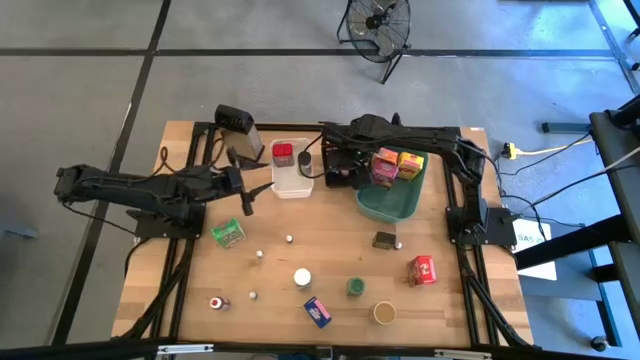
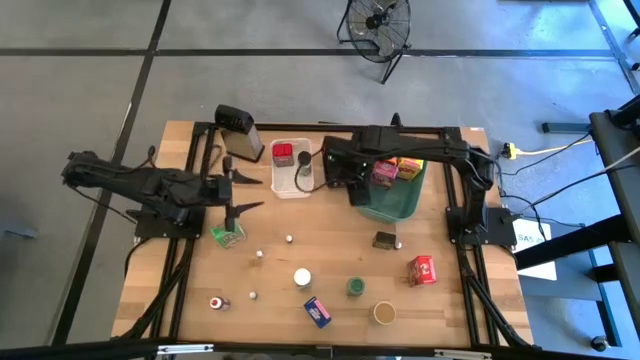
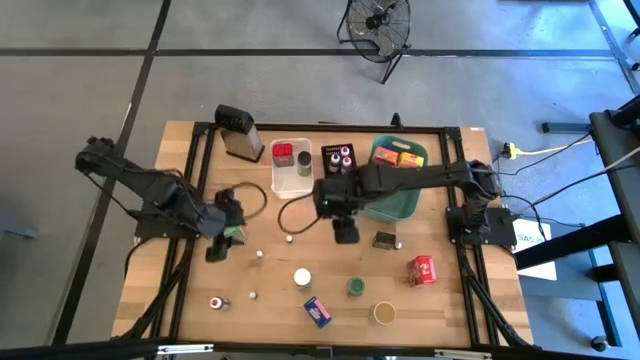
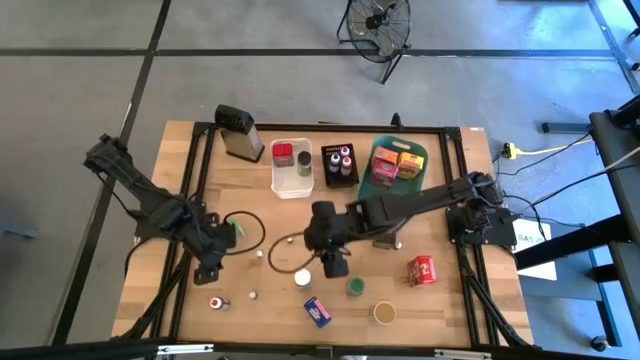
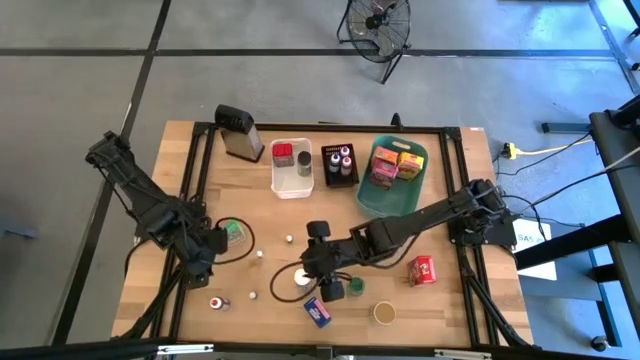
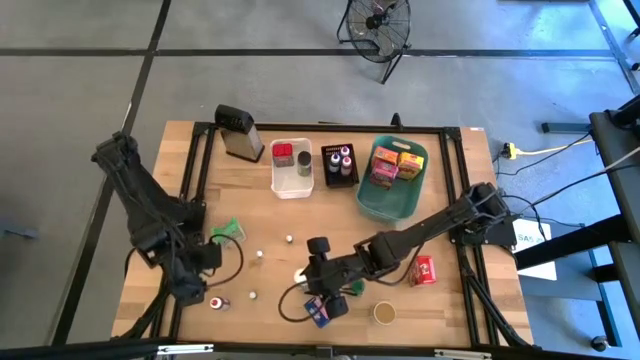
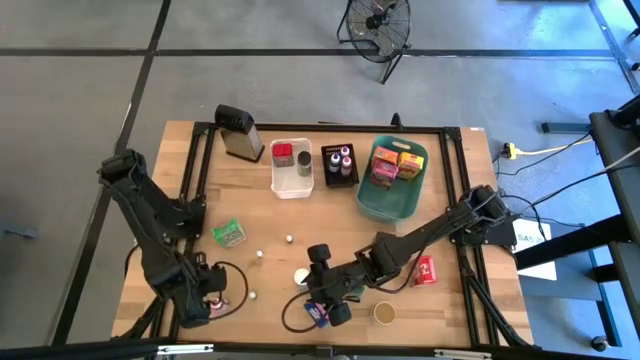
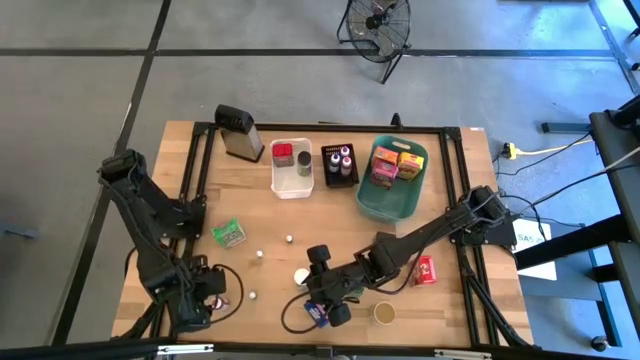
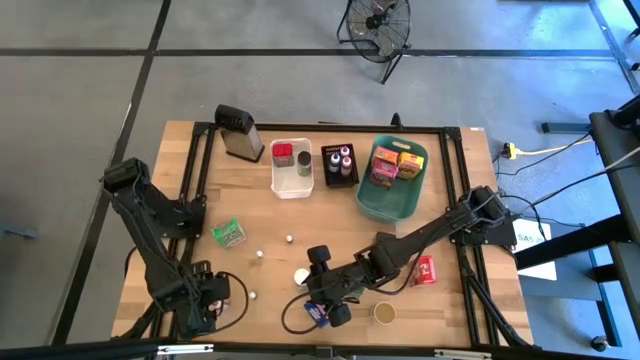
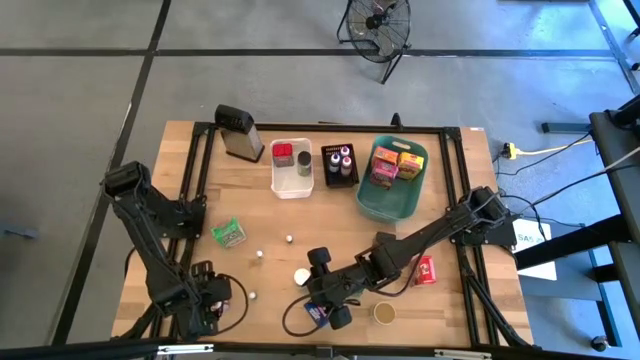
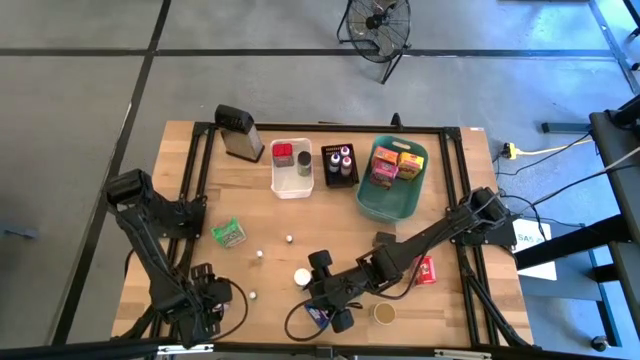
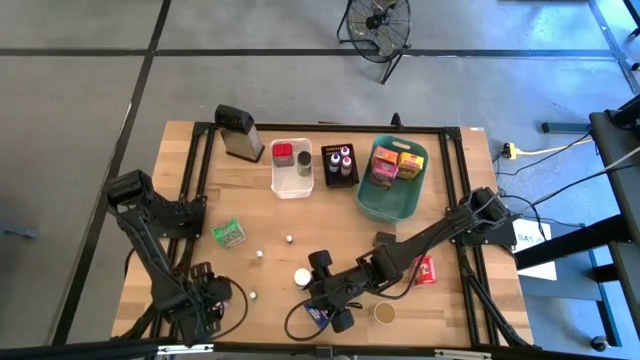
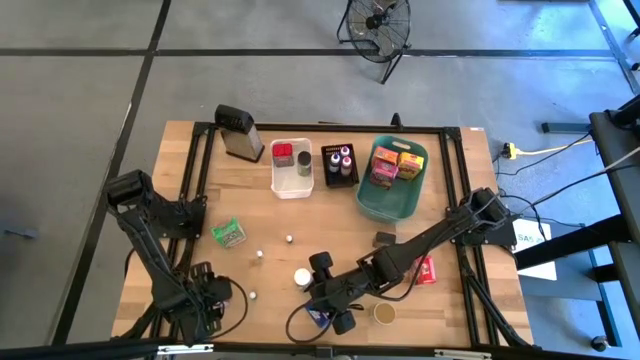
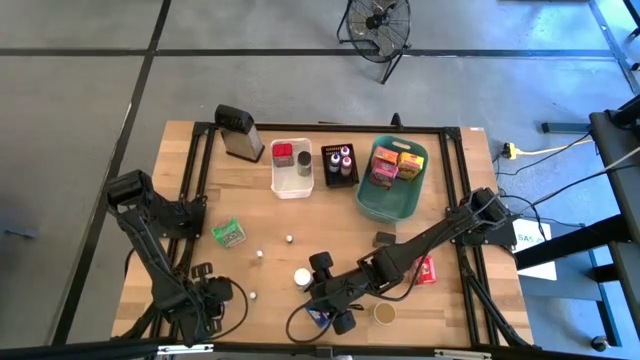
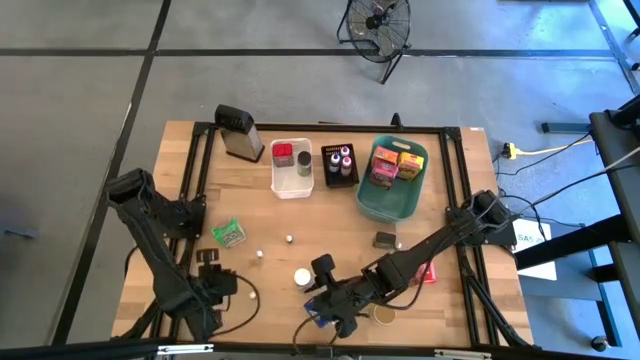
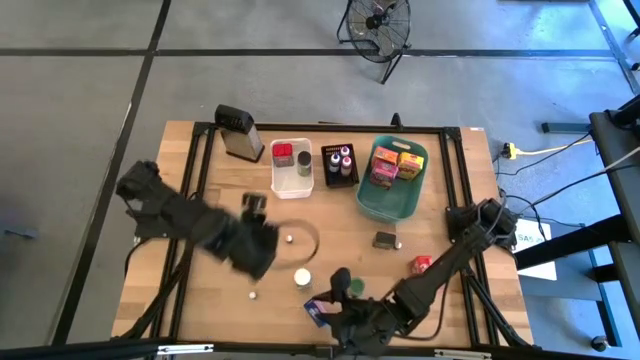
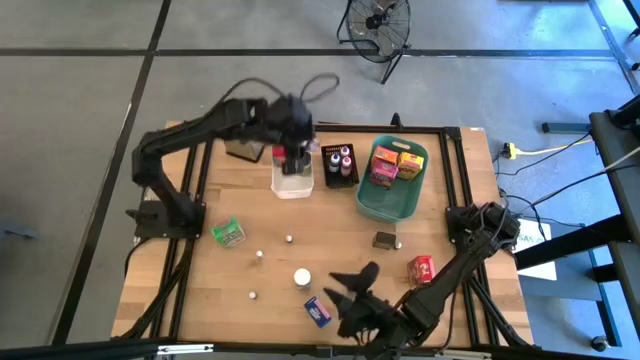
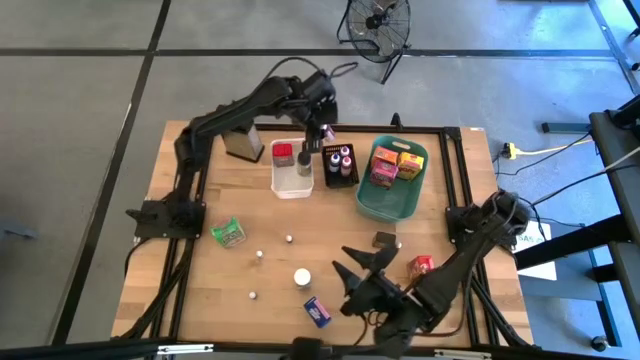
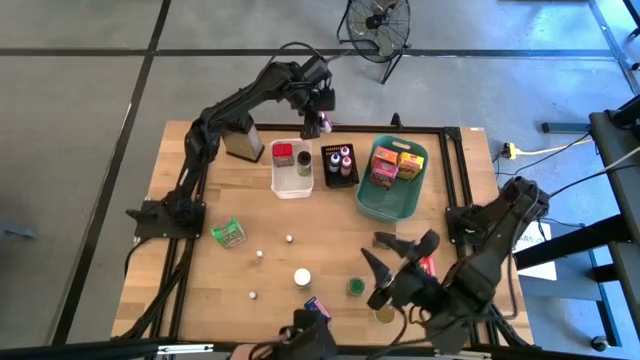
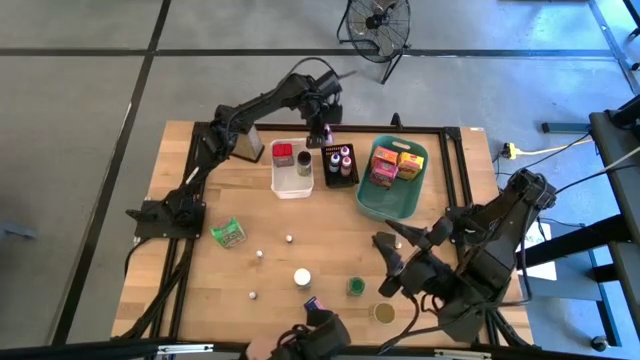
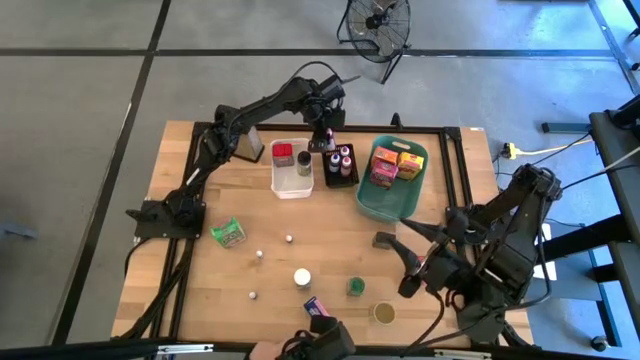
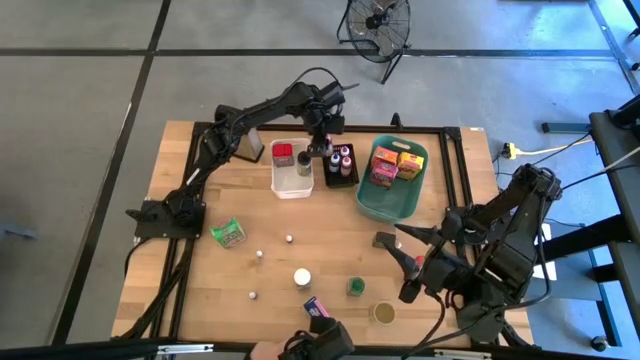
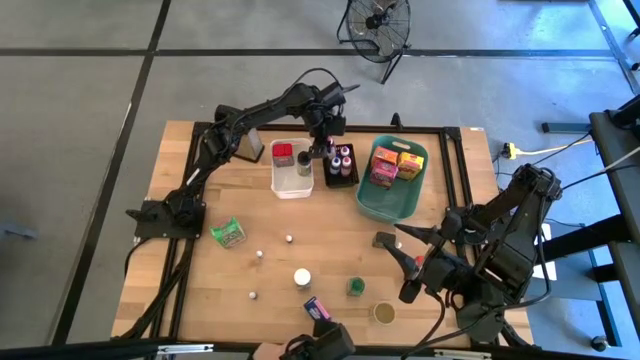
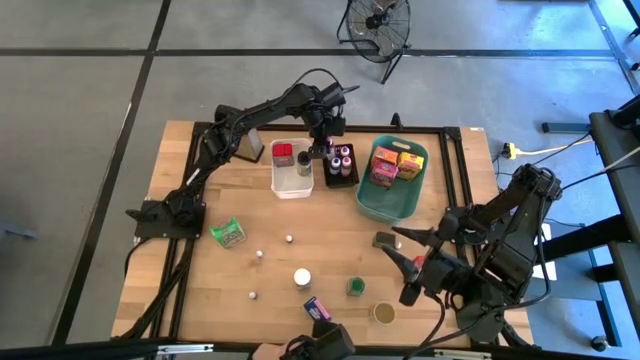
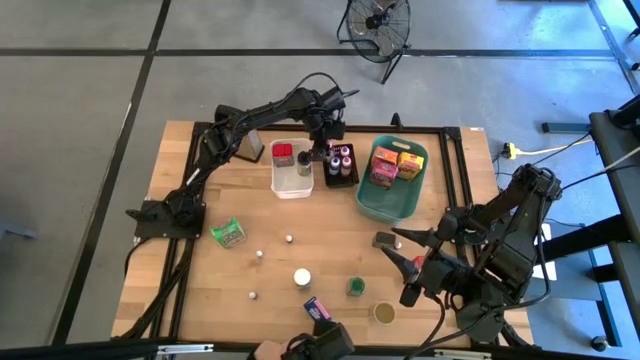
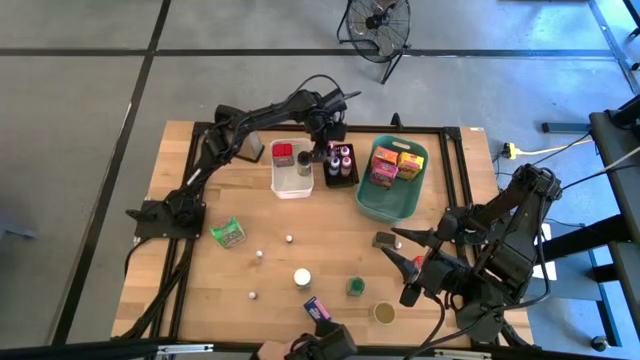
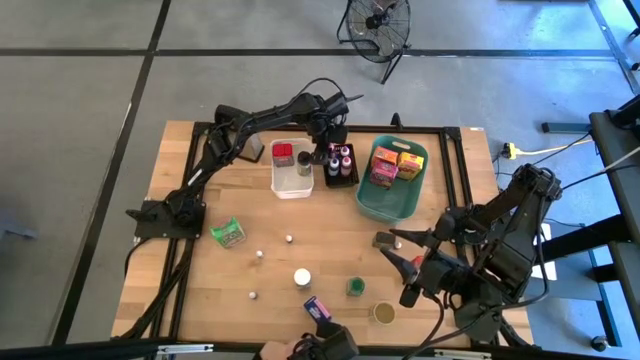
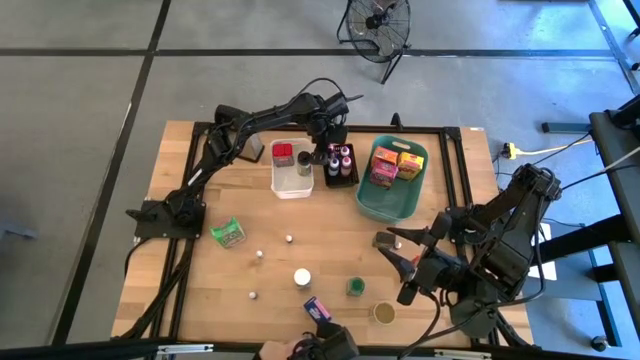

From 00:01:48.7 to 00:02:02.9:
Task: Pick & Place Kitchen Items
Put the large red food coloring bottle into the black bin

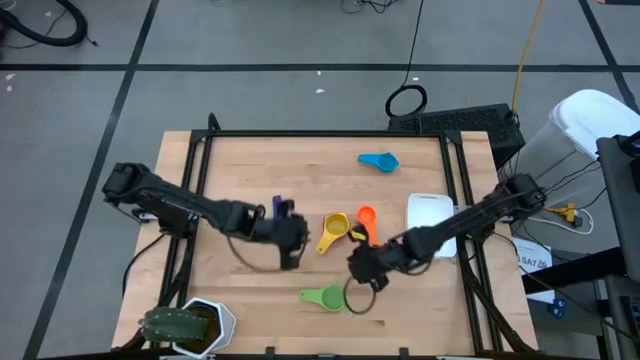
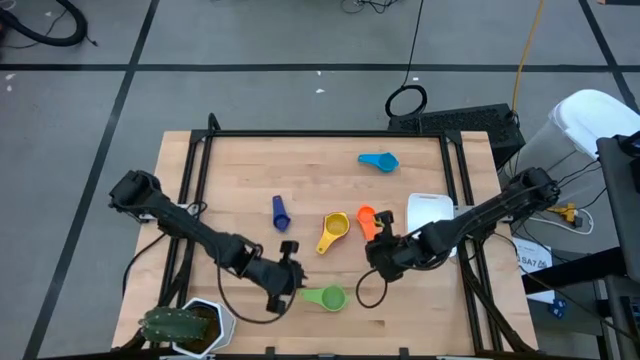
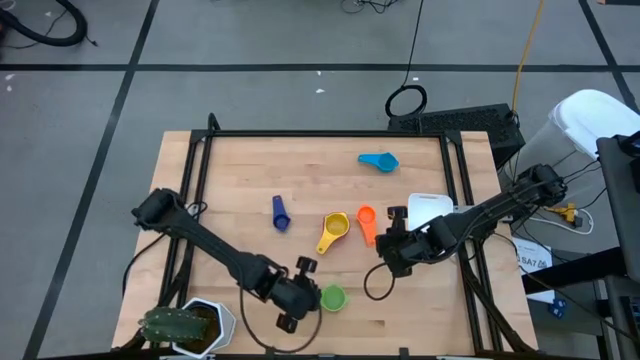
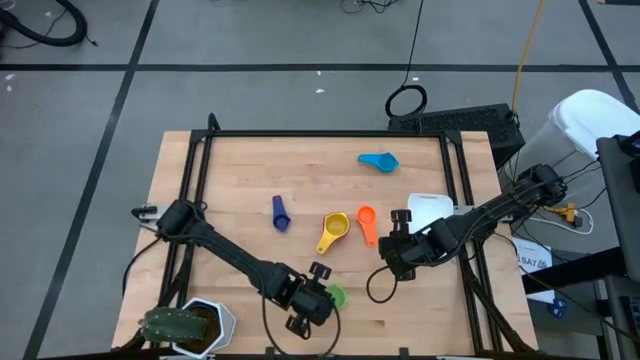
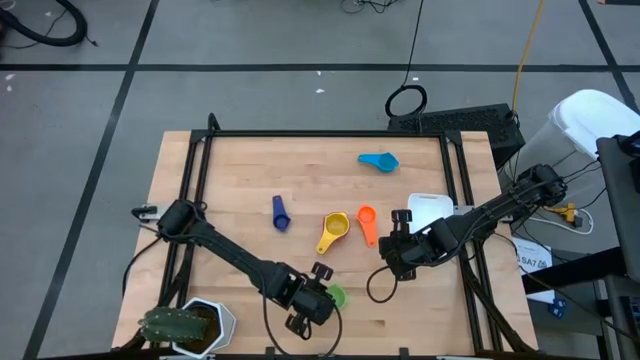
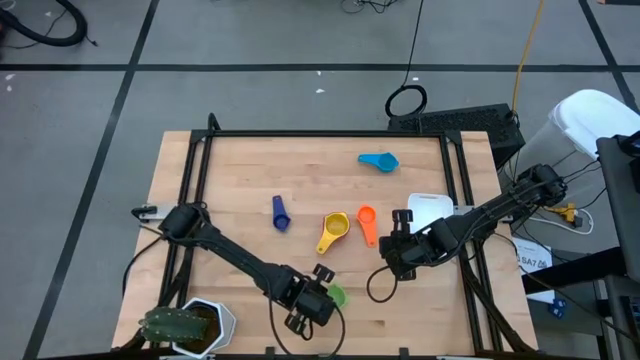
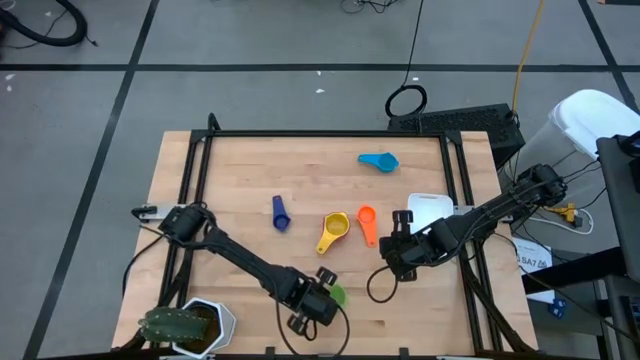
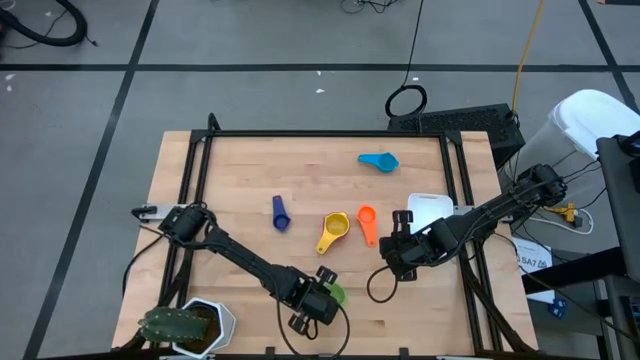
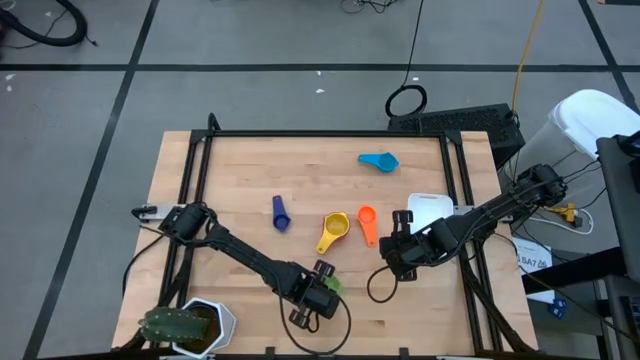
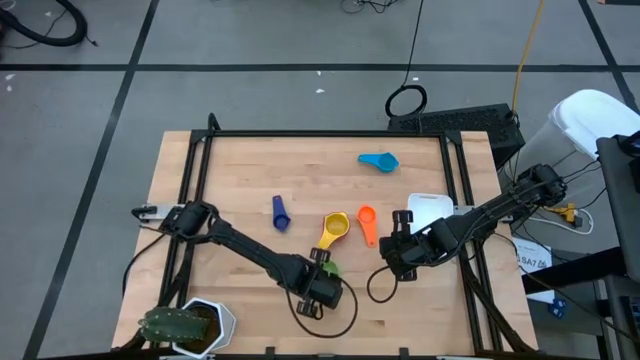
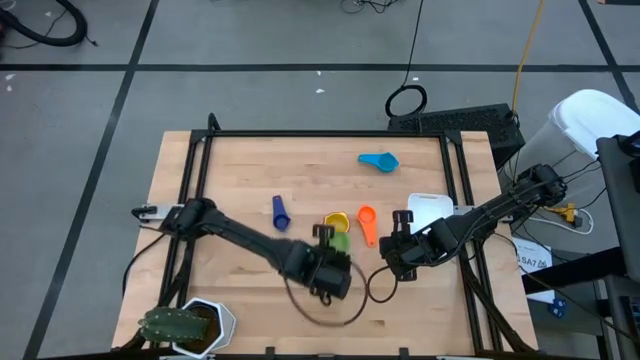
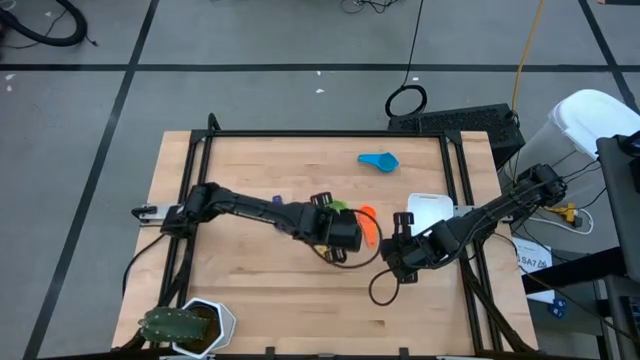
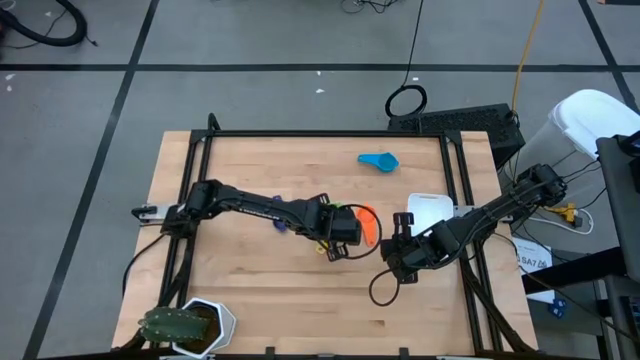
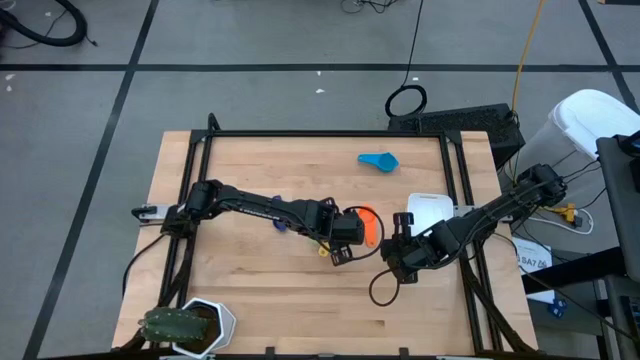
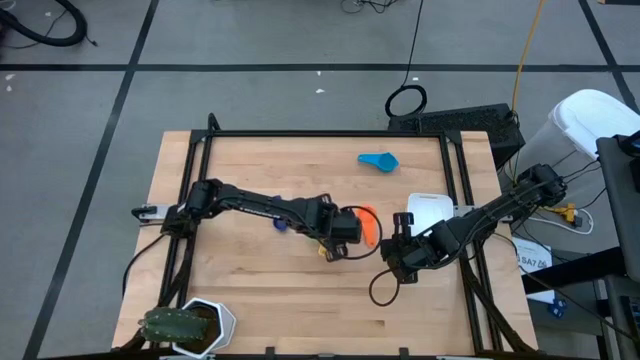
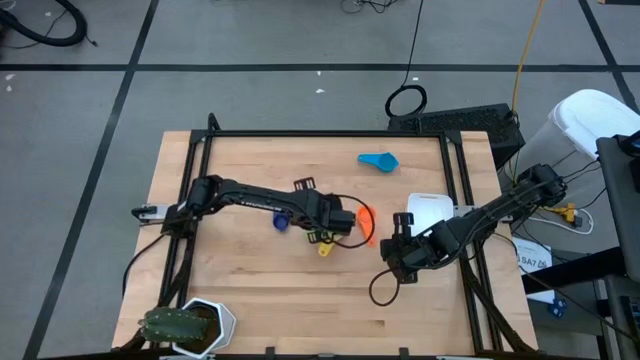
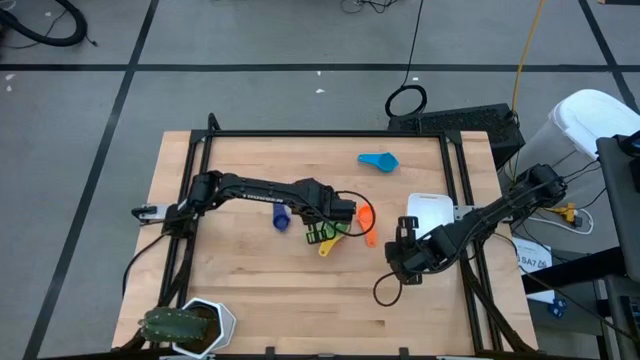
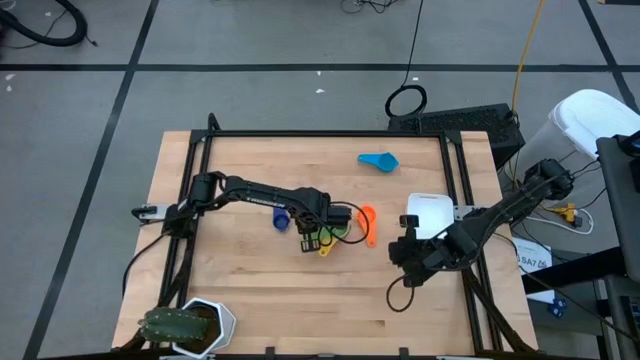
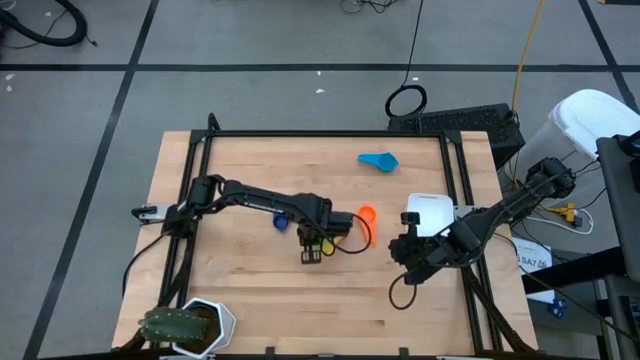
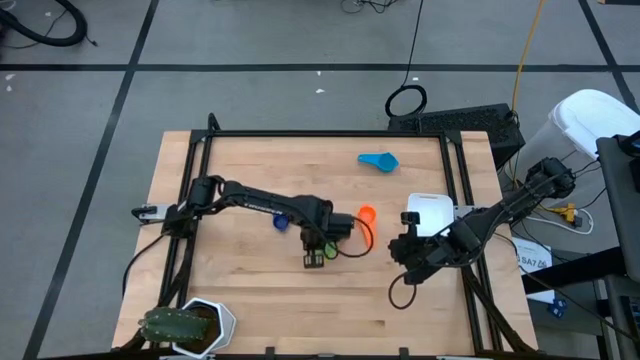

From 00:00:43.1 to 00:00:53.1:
Task: Nest measuring cups in basket
Stack the green measuring cup on top of the yellow measuring cup
